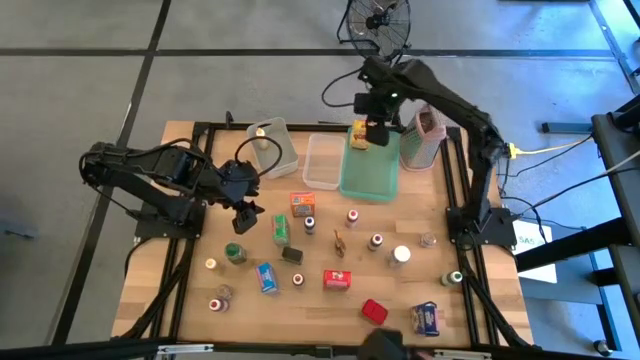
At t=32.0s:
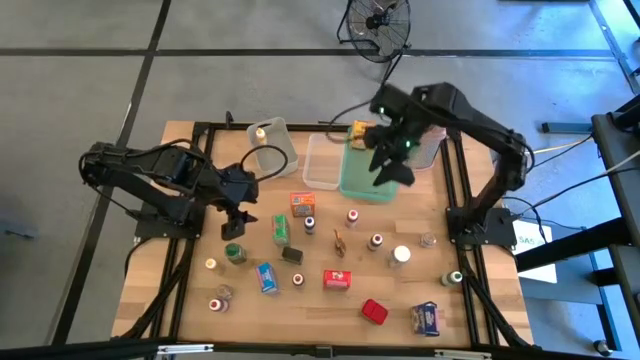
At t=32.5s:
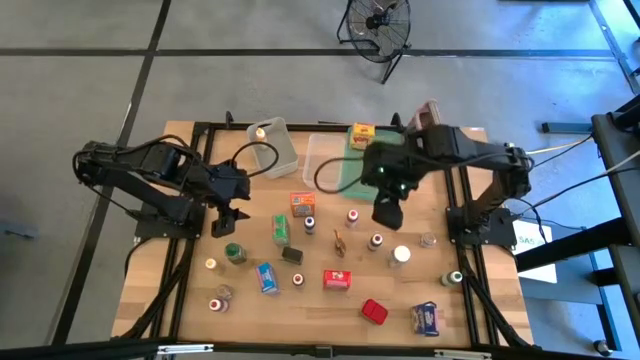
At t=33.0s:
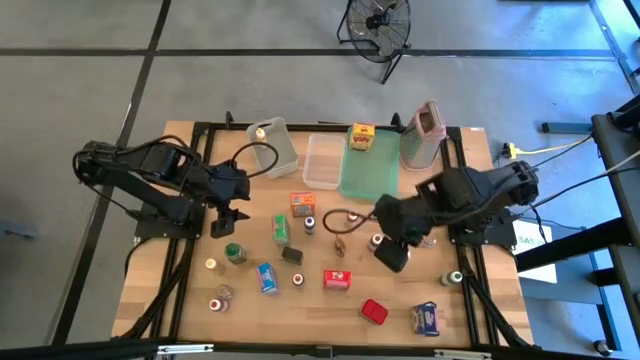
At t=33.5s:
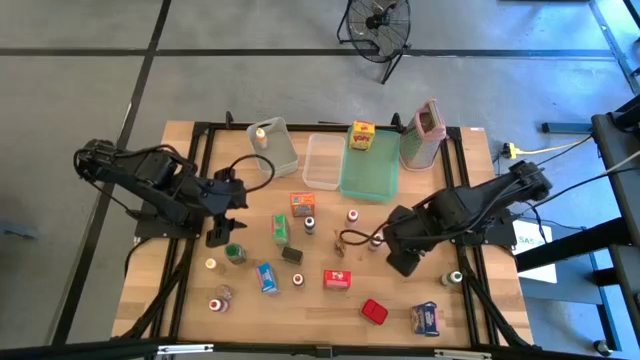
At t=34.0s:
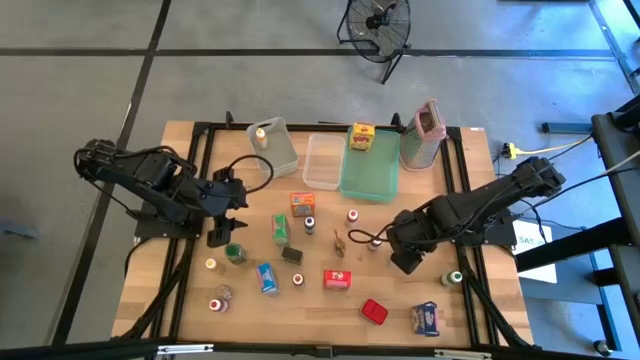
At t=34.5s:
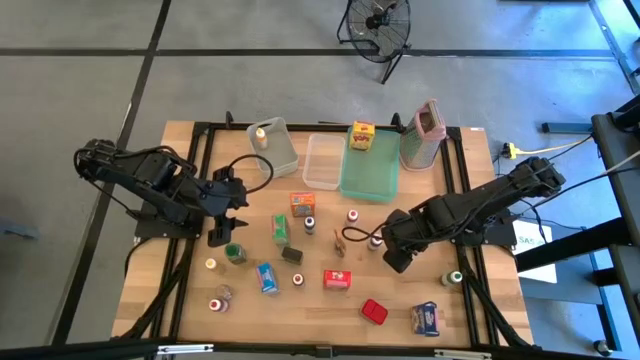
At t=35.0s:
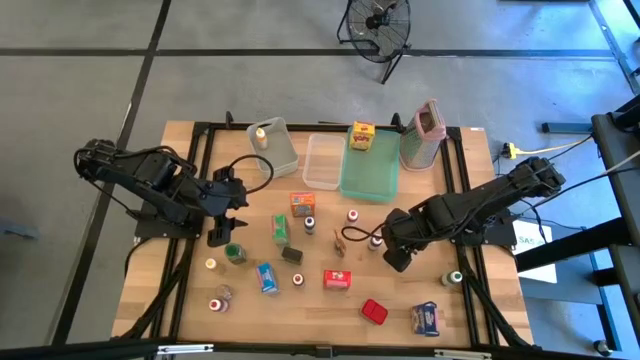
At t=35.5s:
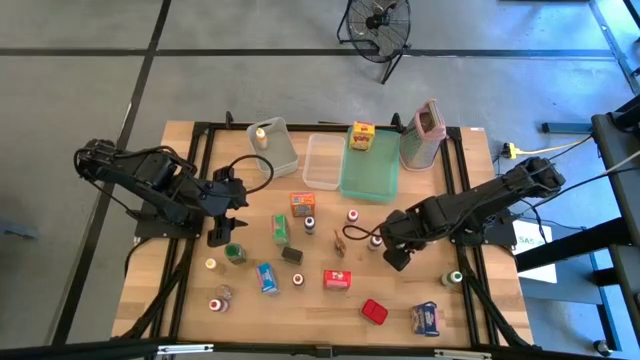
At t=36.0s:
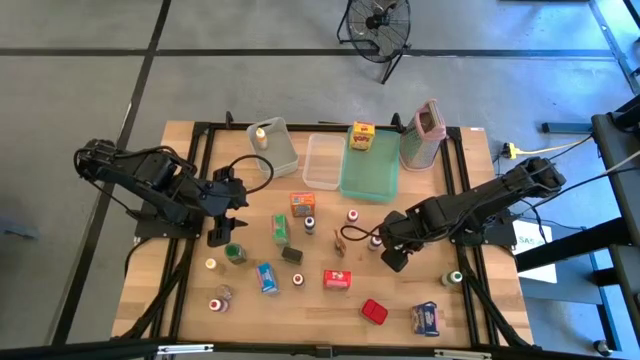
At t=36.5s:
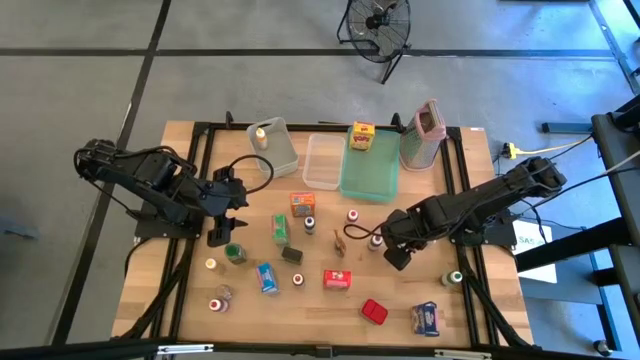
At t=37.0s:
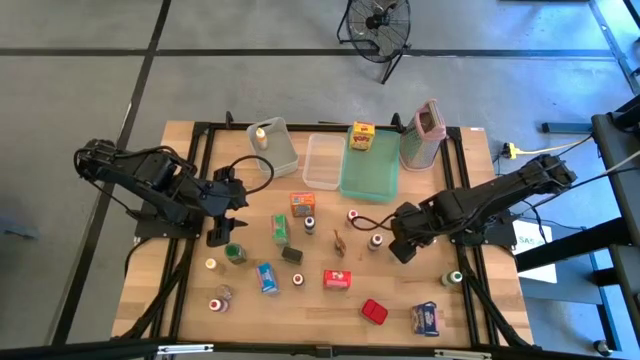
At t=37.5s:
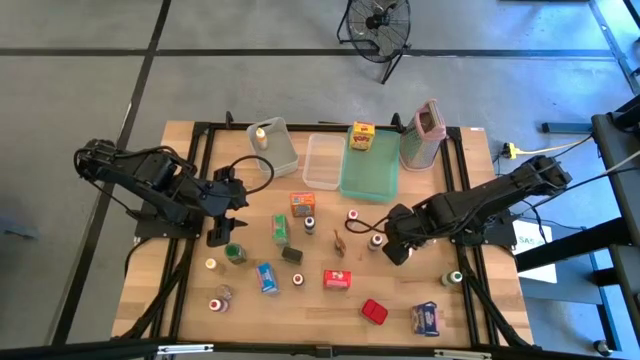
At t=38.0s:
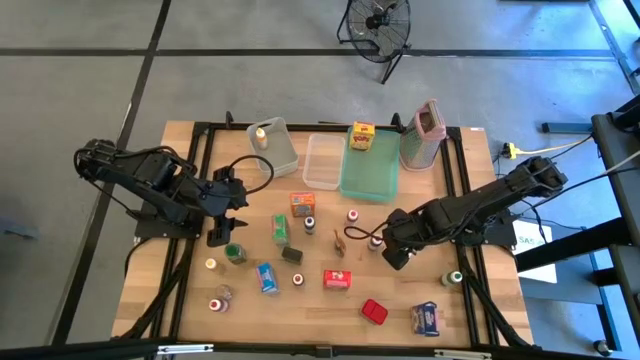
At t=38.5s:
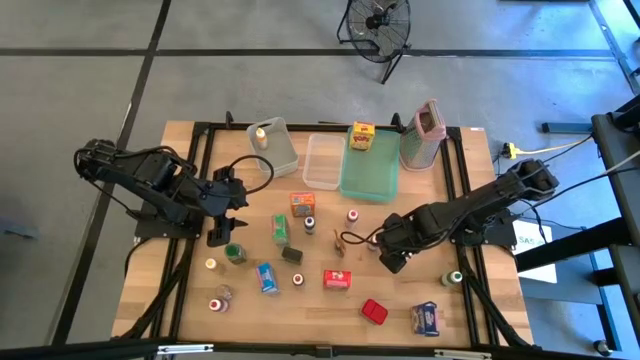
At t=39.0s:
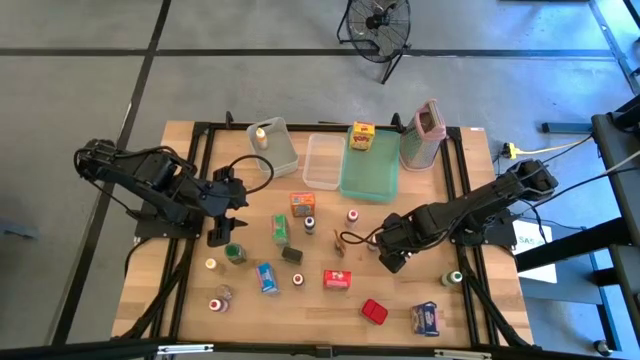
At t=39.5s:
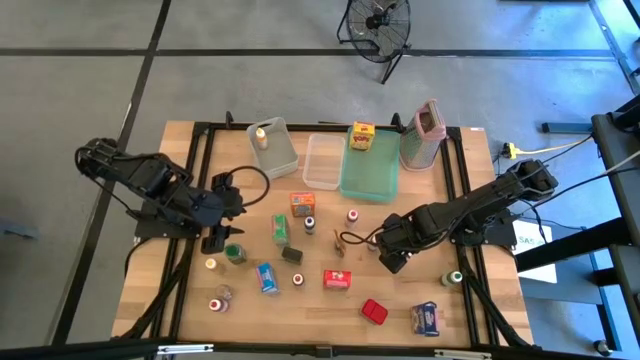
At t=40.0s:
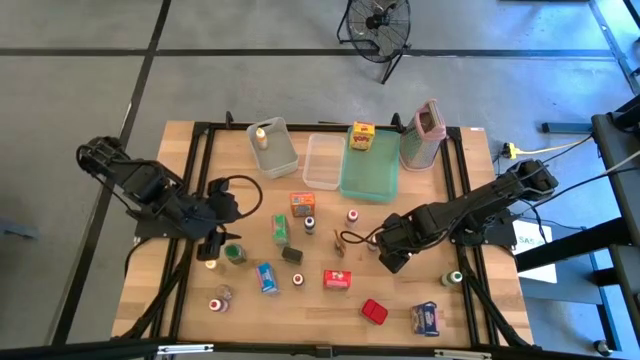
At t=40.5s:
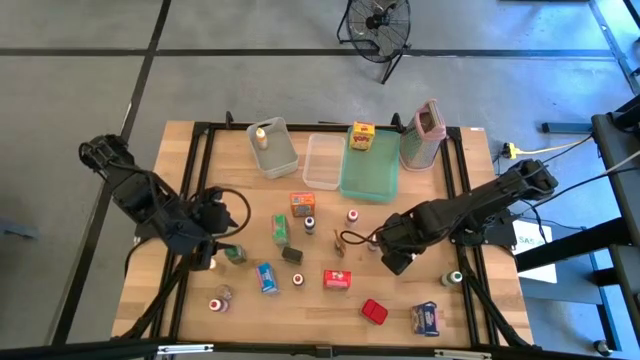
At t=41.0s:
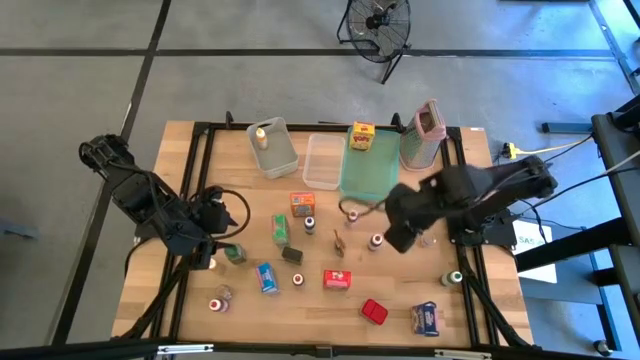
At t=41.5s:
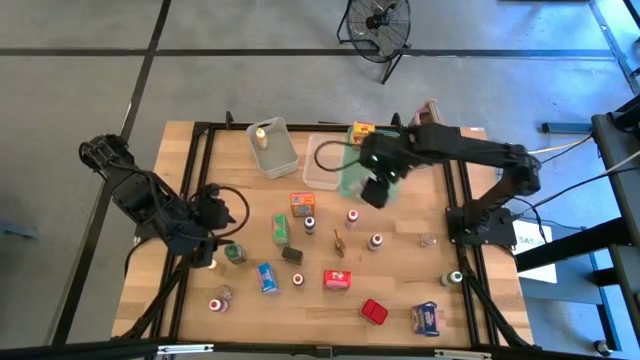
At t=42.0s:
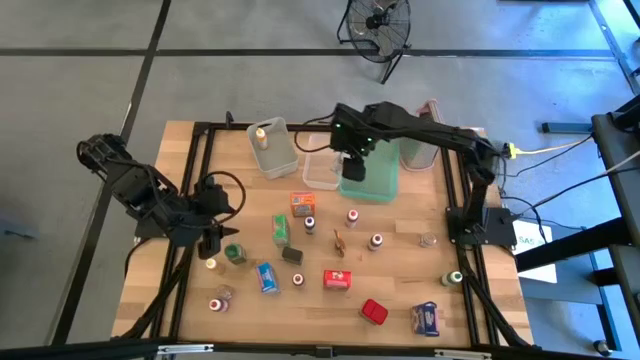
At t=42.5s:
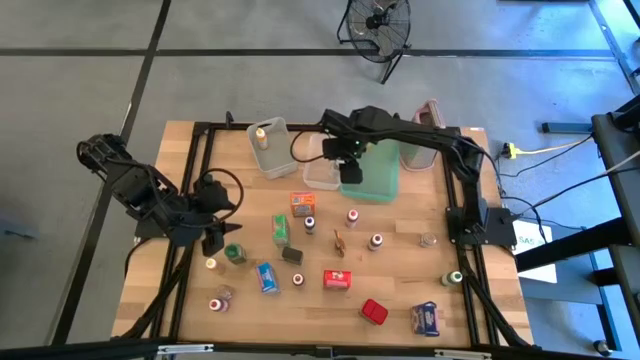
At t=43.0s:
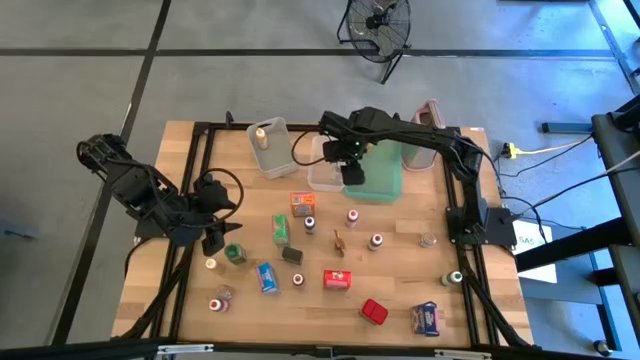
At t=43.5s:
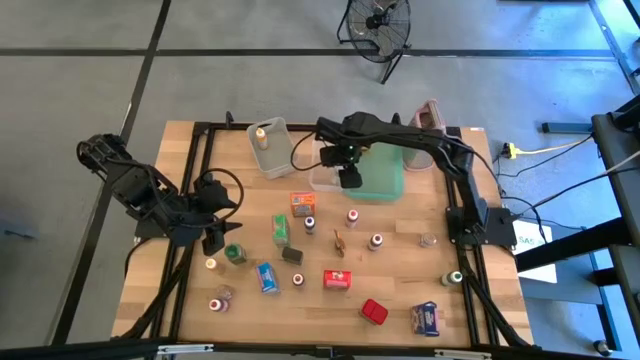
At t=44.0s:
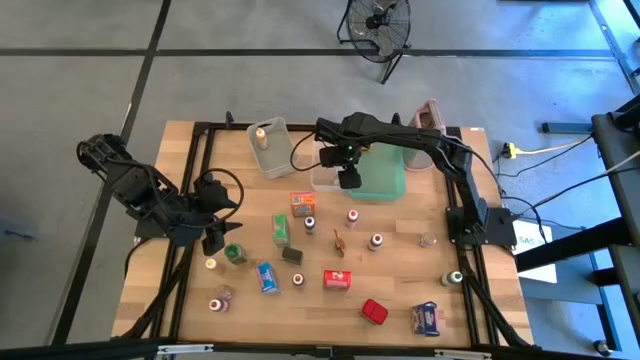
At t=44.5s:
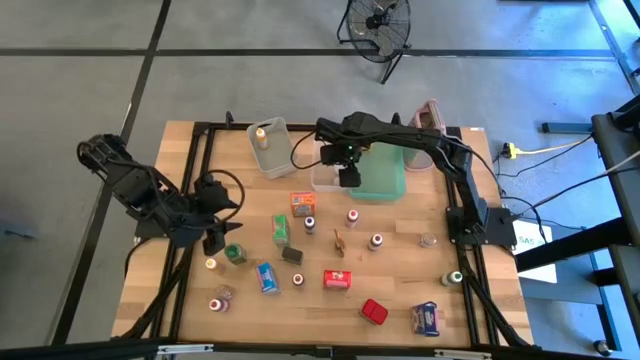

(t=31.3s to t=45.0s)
Task: Pick & Place Kitchen Items
Put the white seasoning bottle into the white bin

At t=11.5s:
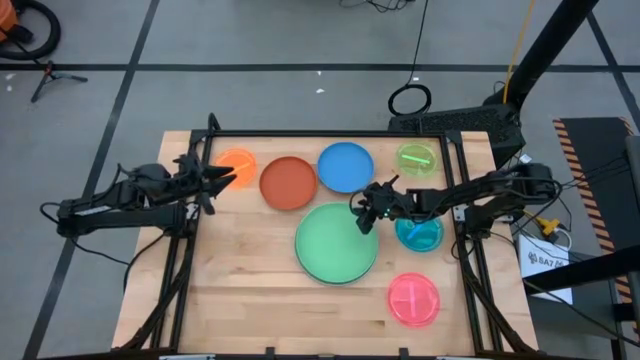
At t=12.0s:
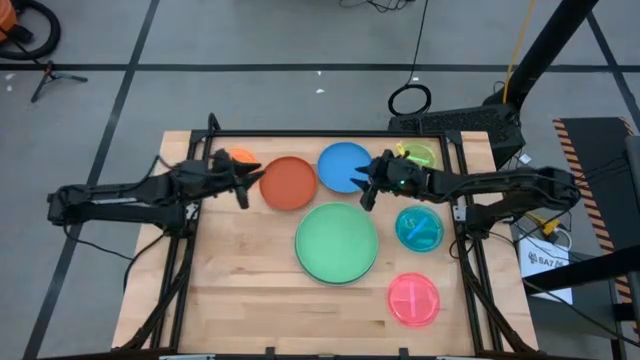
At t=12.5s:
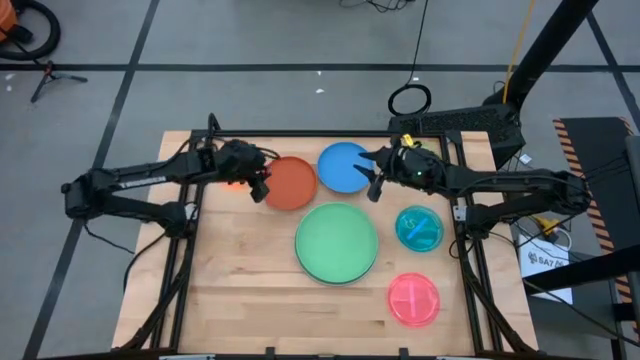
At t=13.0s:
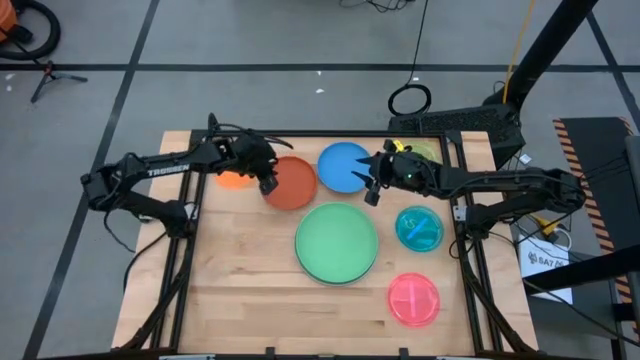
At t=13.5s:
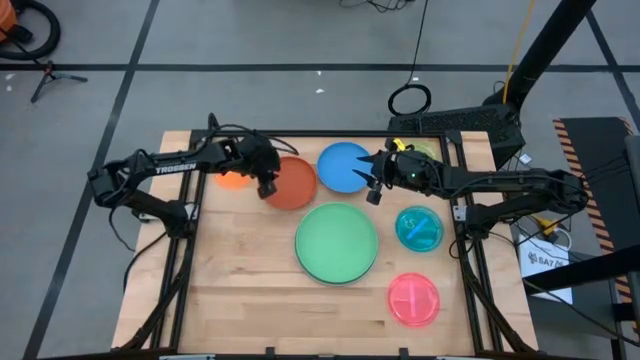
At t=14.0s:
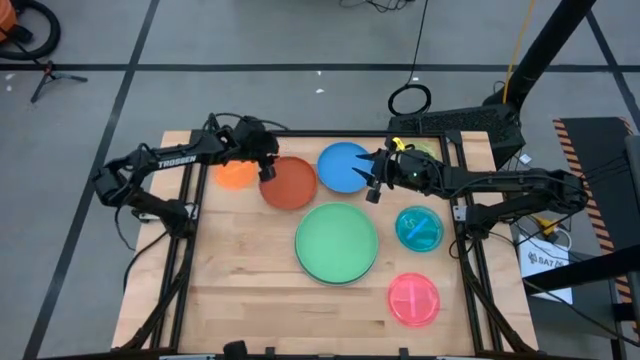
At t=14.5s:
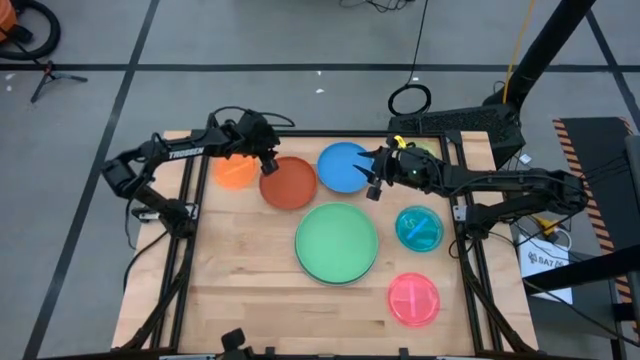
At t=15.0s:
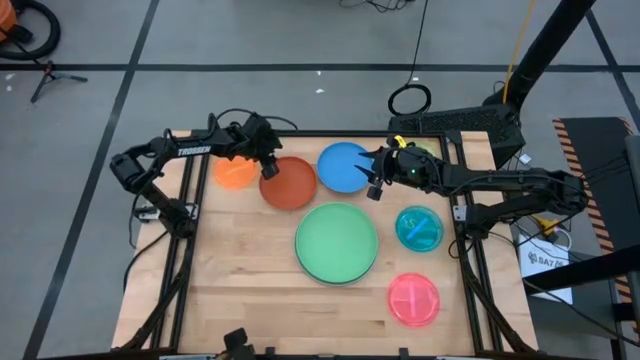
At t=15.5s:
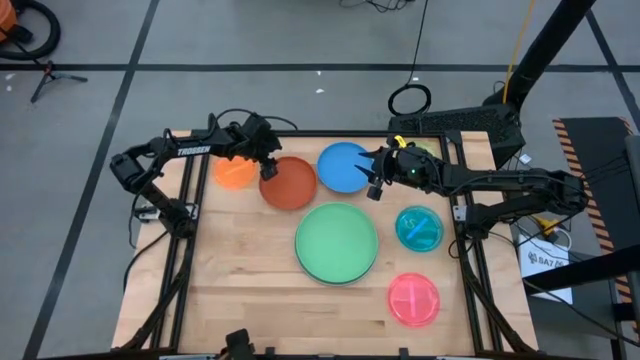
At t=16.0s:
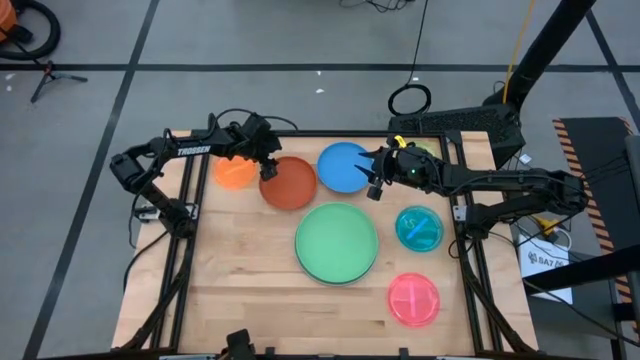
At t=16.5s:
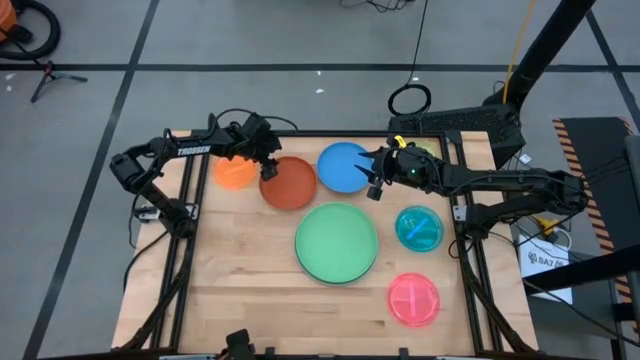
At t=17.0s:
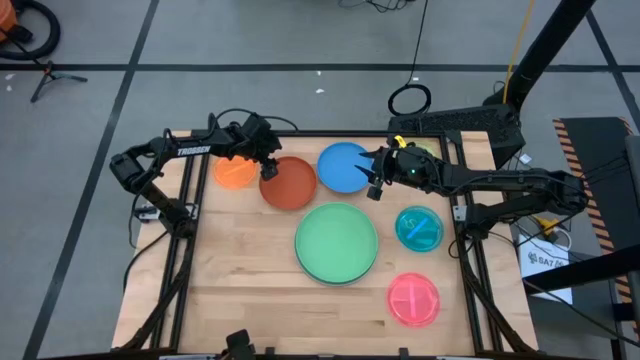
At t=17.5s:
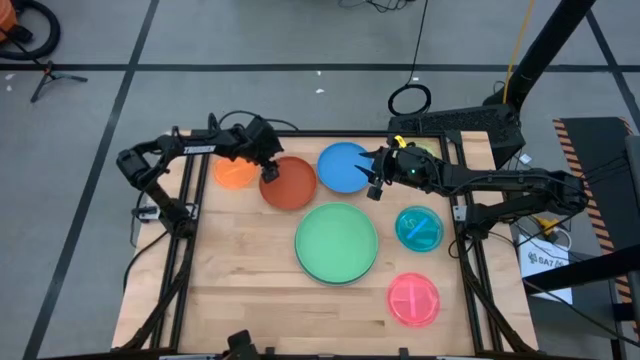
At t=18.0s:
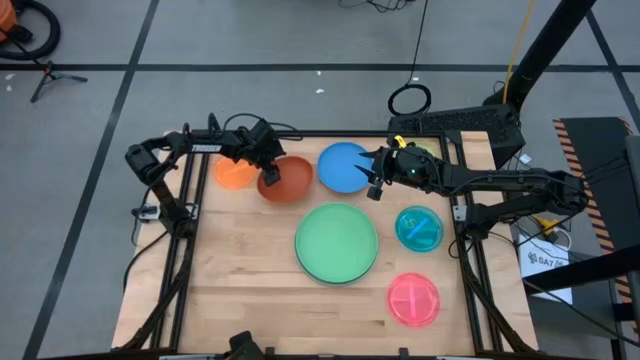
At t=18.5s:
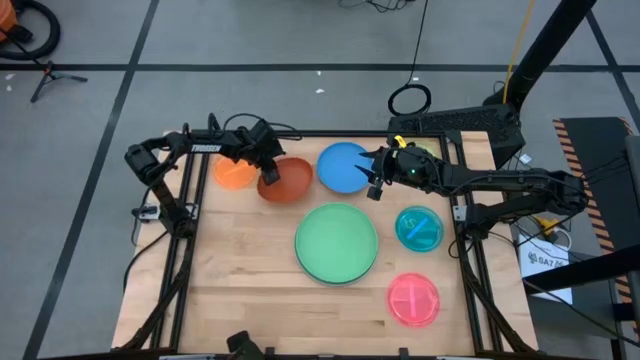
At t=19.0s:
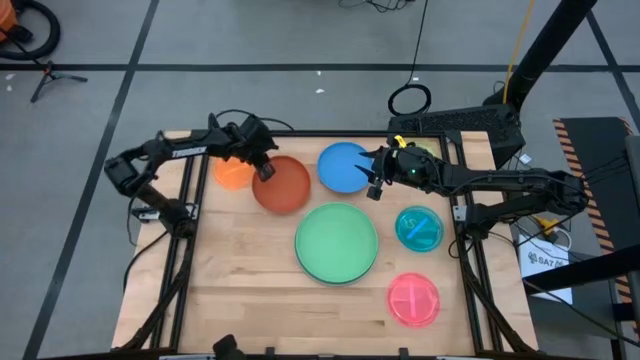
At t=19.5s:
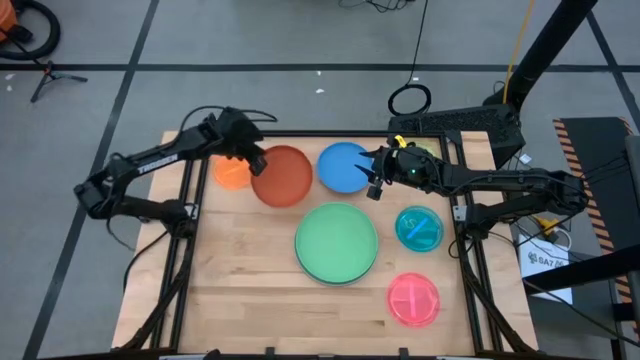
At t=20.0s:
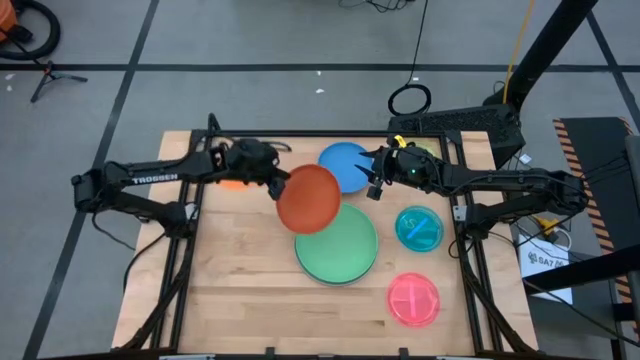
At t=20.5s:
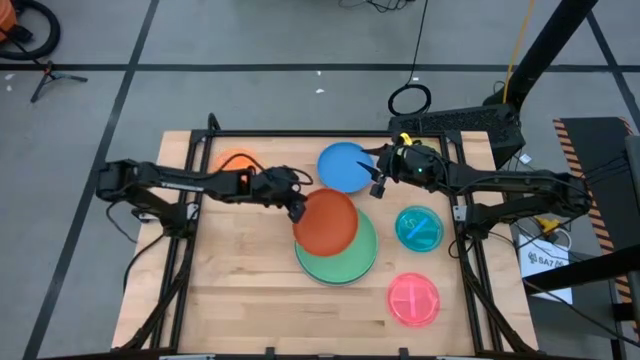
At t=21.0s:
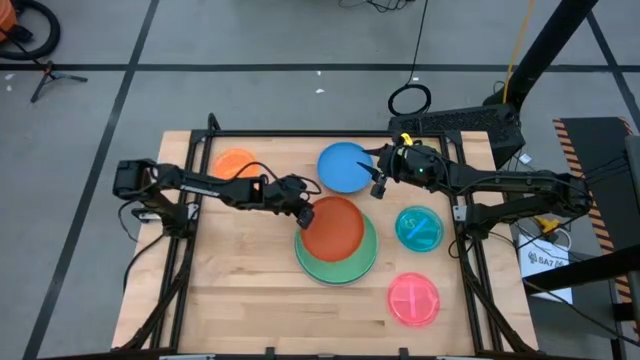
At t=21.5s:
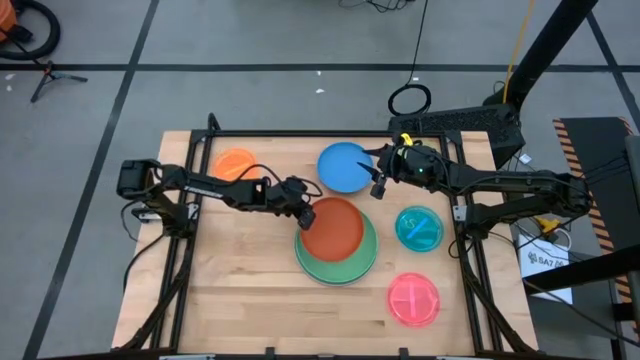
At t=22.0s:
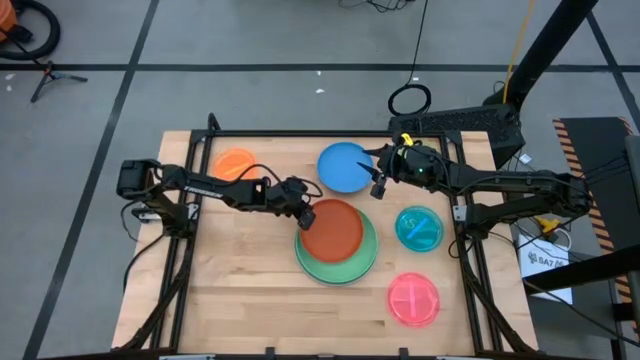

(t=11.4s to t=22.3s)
Task: Stack plastic plates
Stack the dark orange plate on top of the green plate
